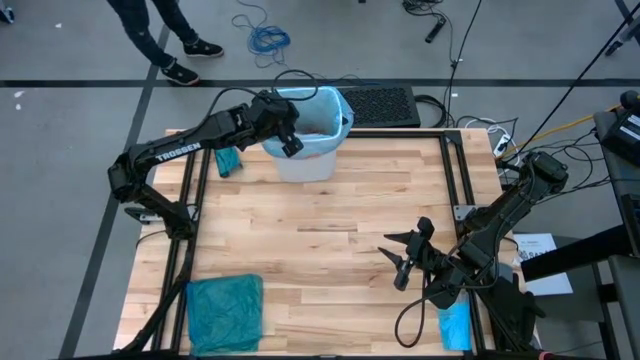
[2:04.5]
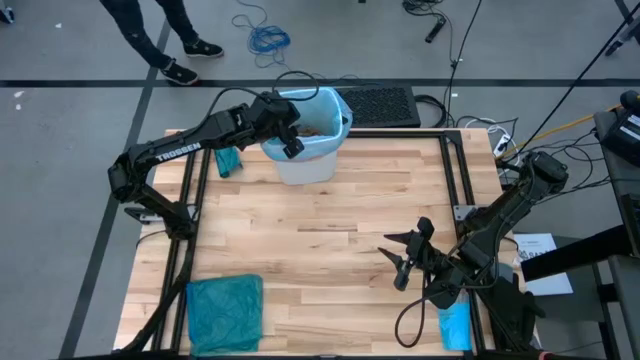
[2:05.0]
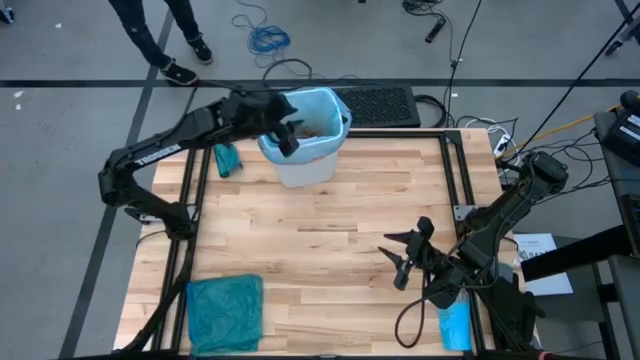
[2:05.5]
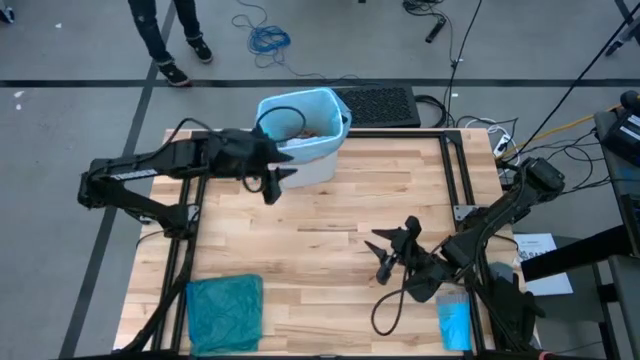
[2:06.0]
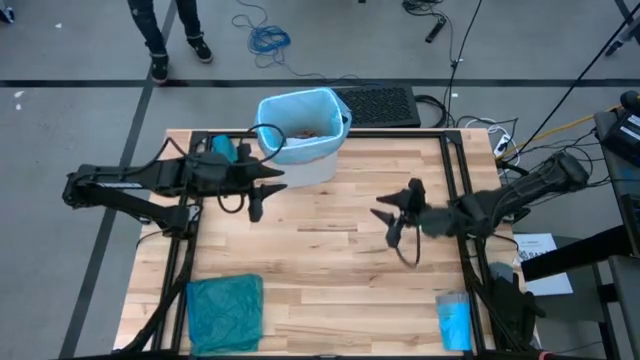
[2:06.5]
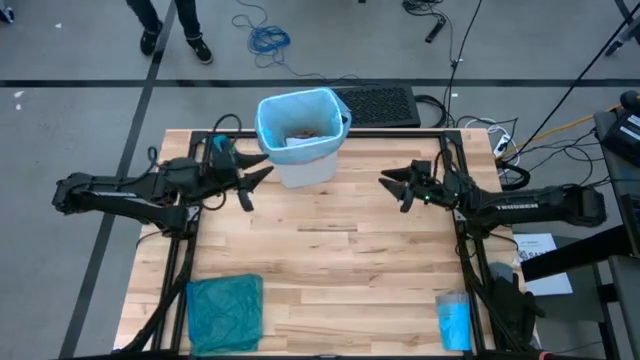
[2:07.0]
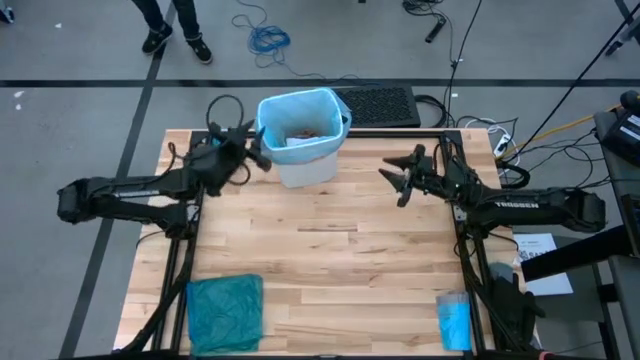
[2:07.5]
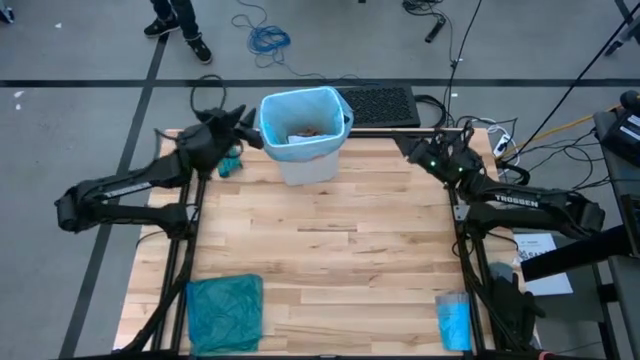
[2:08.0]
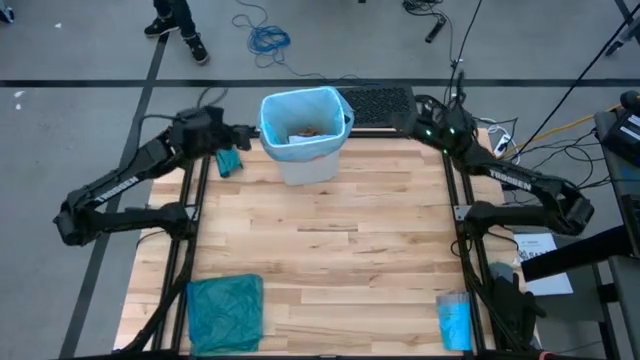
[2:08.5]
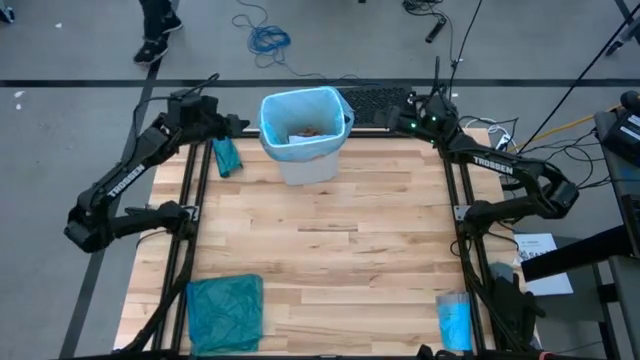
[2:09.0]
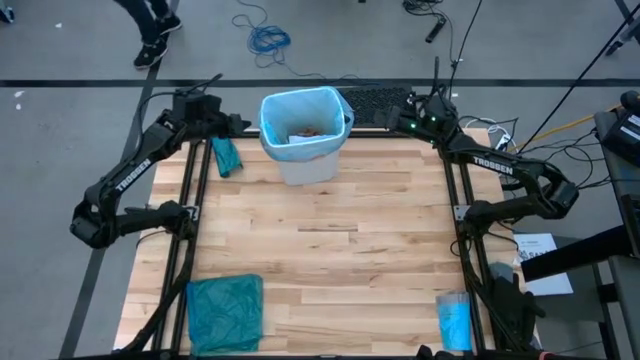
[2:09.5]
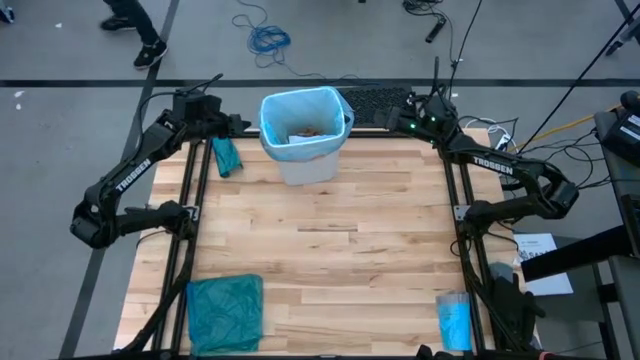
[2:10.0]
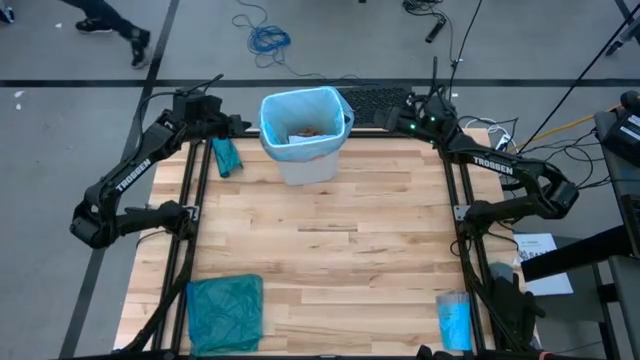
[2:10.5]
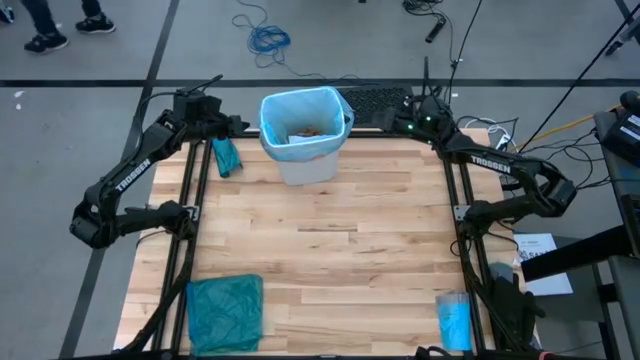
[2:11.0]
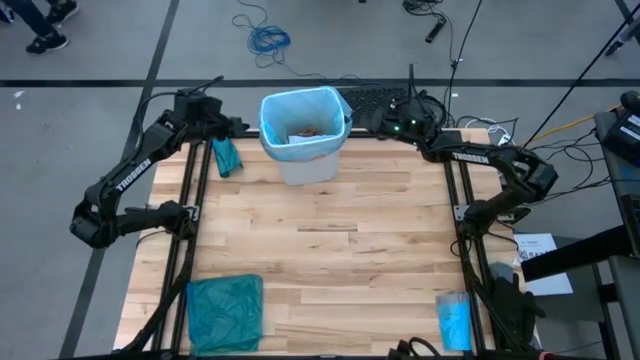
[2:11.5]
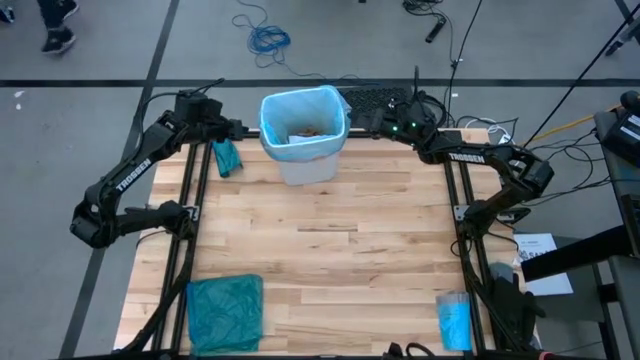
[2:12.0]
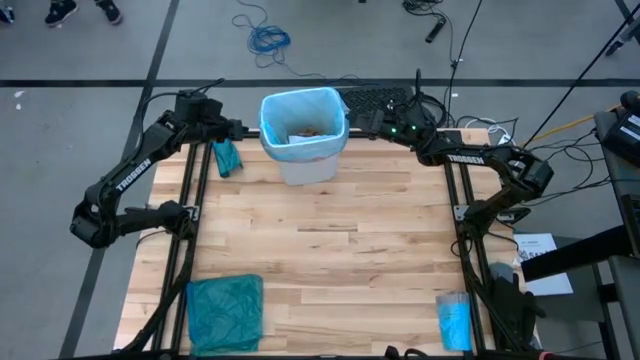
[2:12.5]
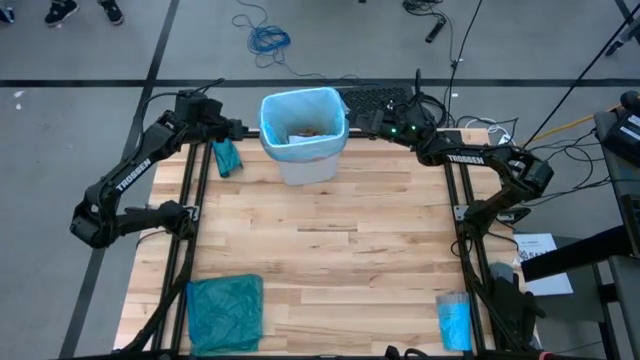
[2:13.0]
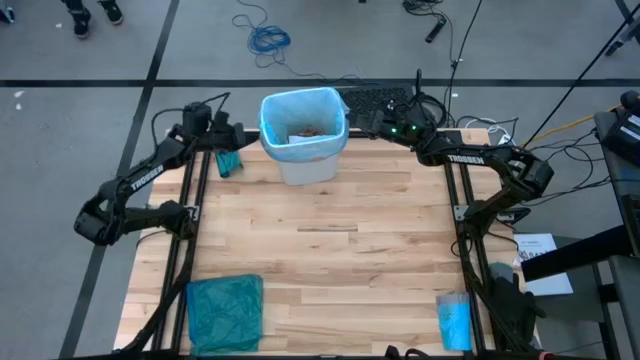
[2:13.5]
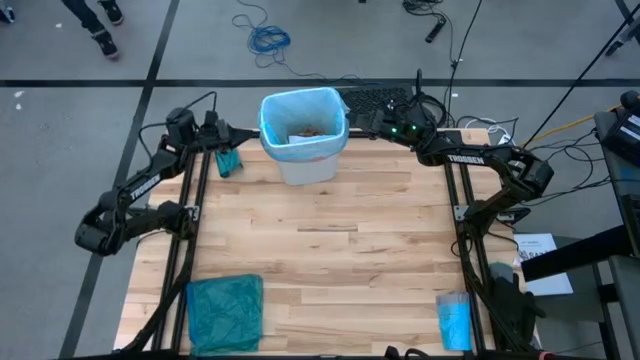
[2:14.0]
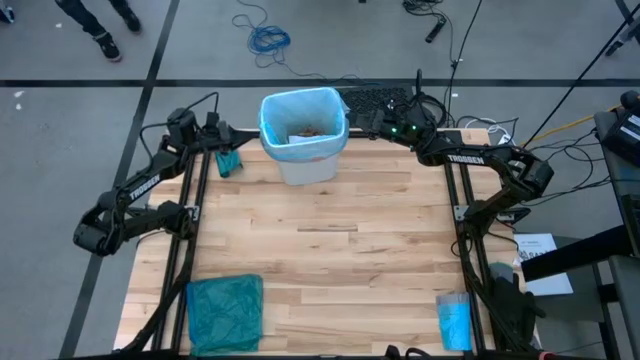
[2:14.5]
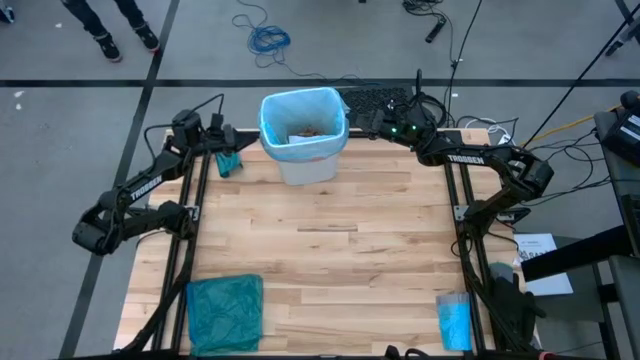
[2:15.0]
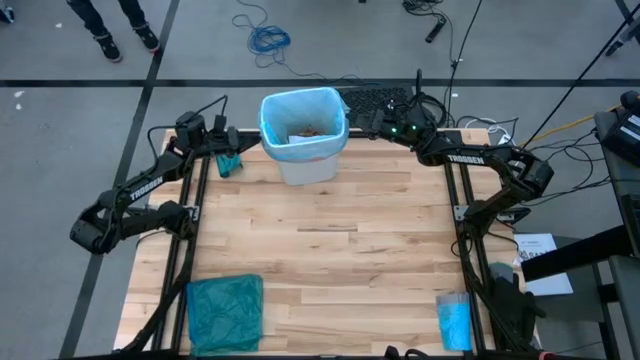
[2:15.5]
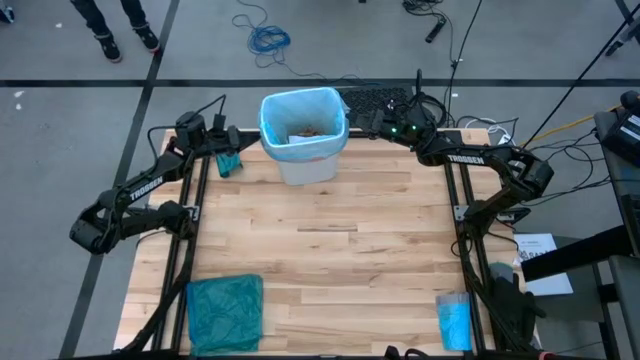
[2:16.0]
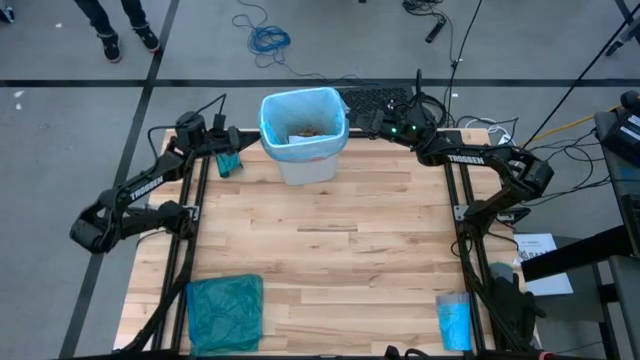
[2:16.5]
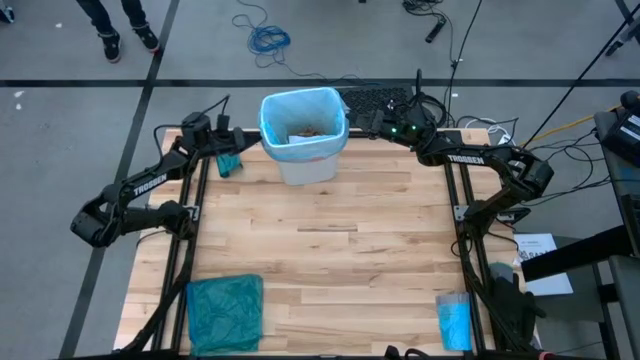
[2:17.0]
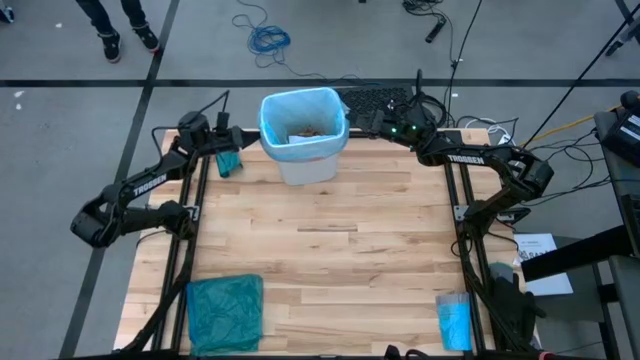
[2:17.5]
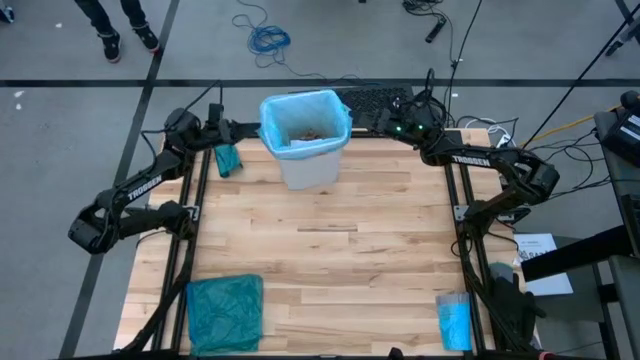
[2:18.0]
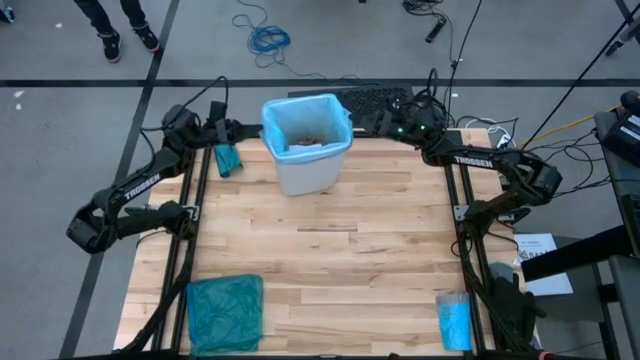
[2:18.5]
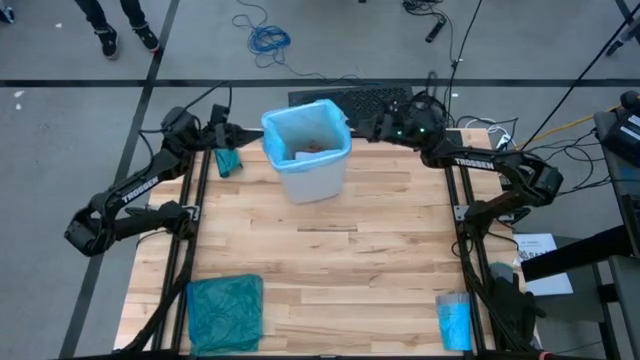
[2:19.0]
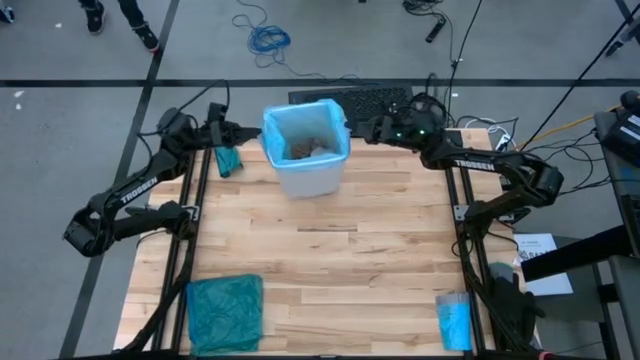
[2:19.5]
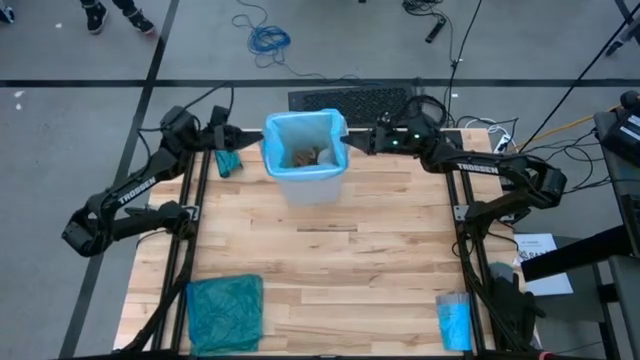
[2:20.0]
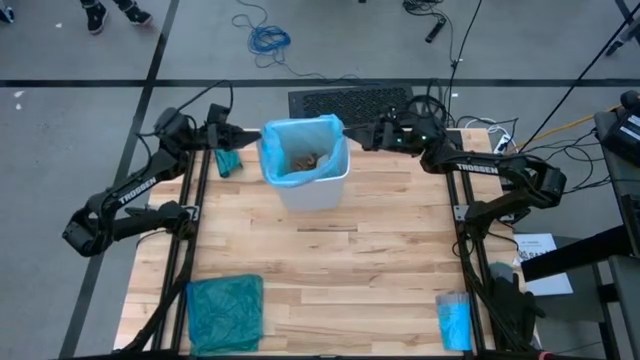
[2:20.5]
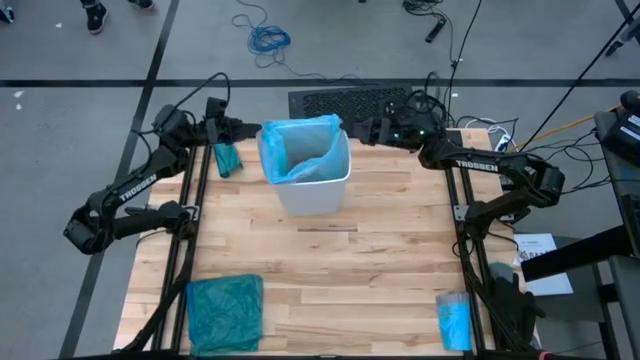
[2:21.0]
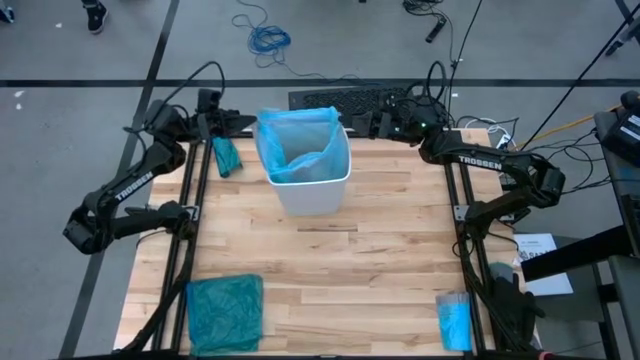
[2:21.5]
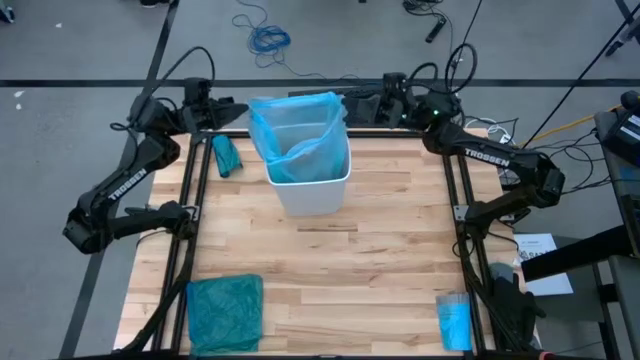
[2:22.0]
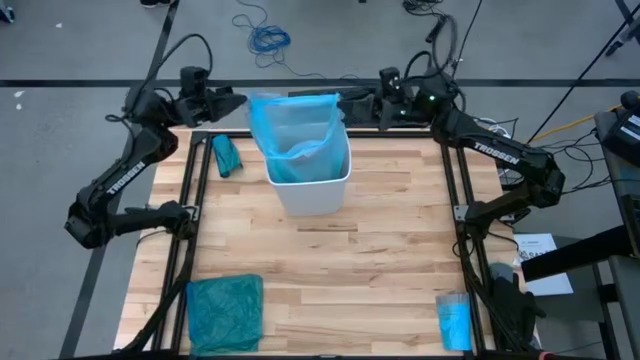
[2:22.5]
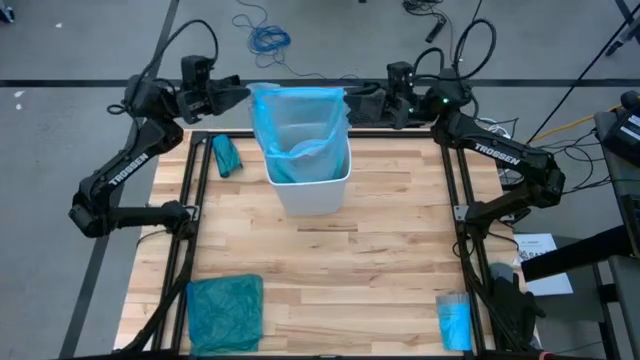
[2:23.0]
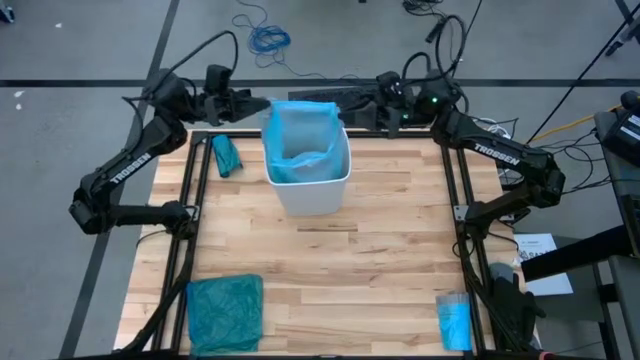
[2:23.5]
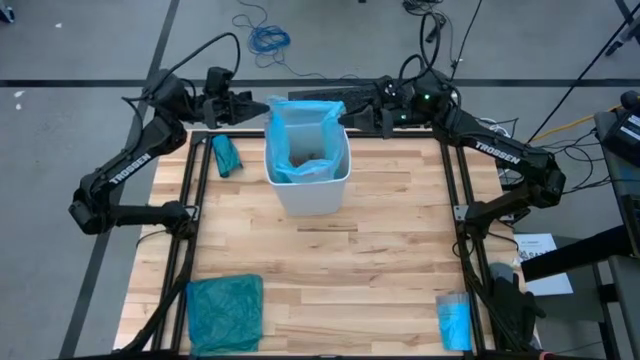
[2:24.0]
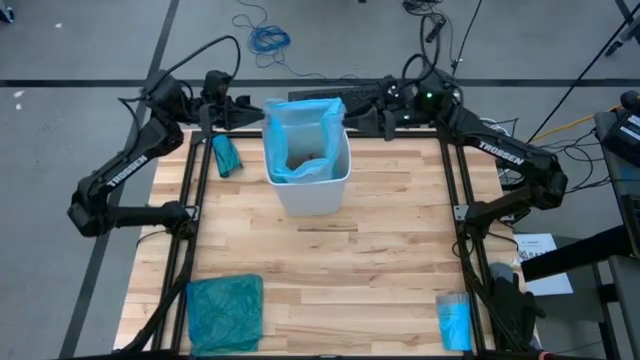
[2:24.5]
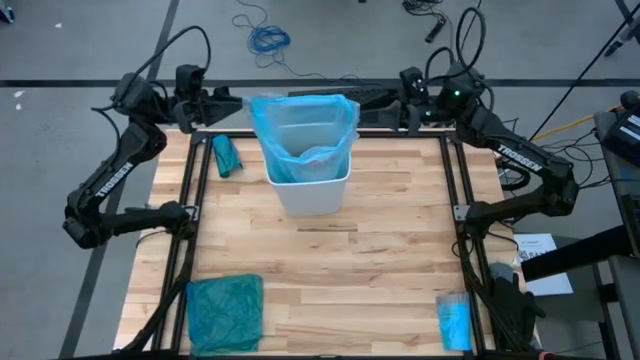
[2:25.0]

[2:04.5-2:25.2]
Task: place trash/remove bag and relplace
Remove the blue trash bag from the white trash bin
